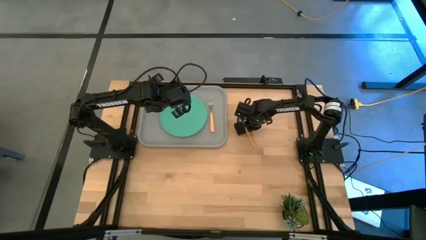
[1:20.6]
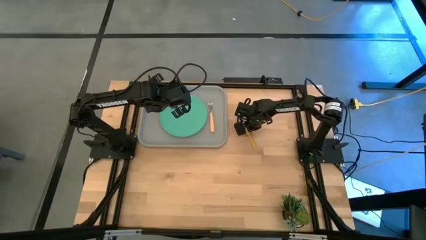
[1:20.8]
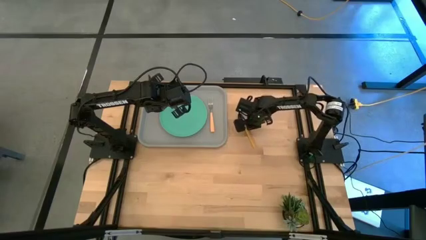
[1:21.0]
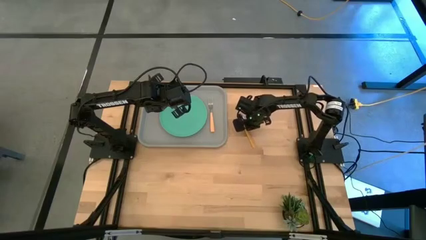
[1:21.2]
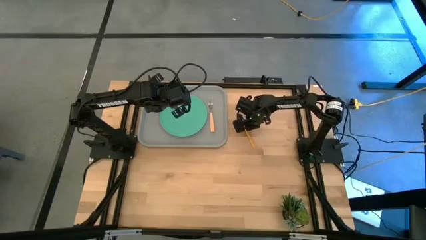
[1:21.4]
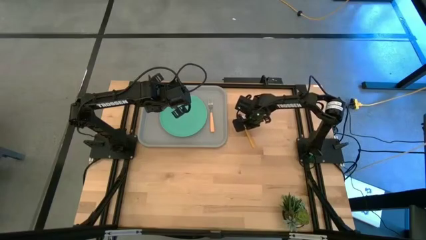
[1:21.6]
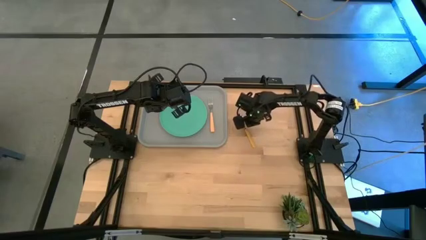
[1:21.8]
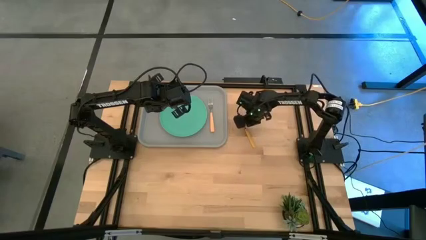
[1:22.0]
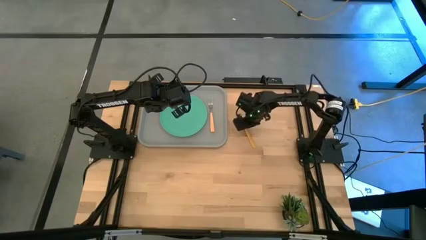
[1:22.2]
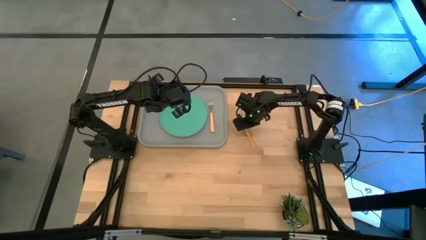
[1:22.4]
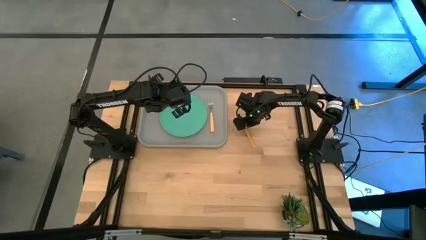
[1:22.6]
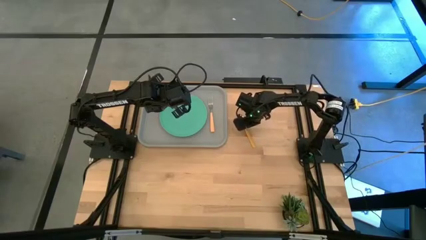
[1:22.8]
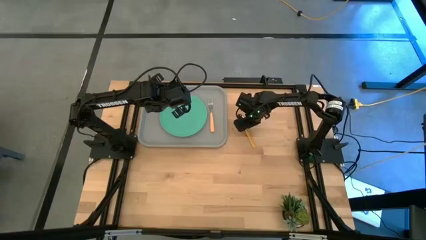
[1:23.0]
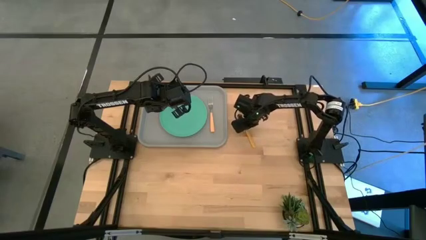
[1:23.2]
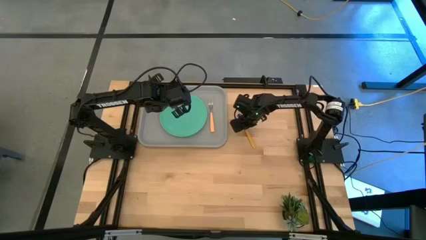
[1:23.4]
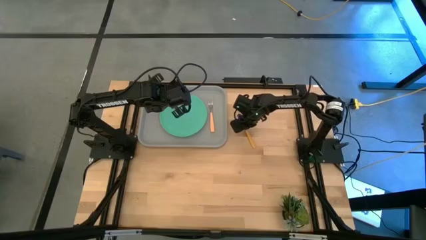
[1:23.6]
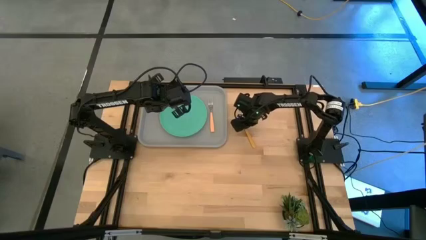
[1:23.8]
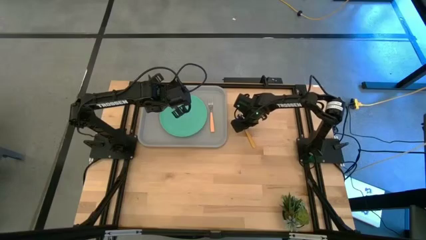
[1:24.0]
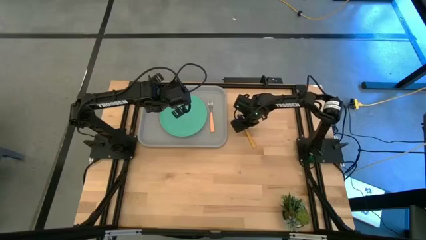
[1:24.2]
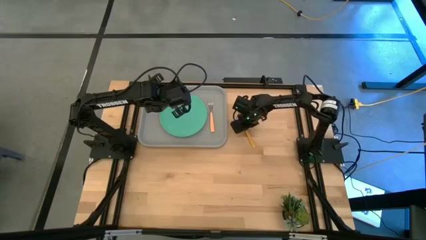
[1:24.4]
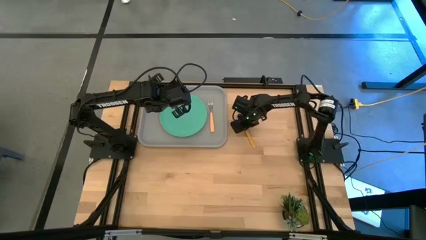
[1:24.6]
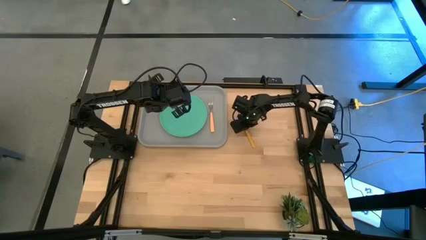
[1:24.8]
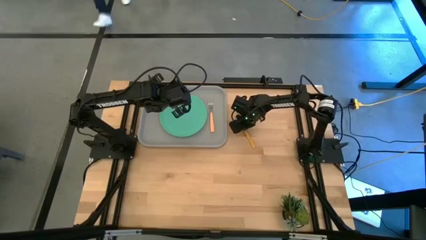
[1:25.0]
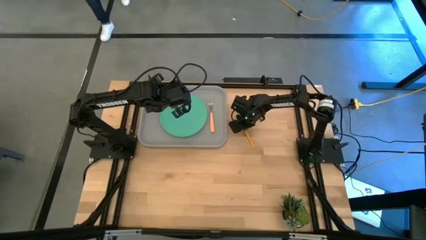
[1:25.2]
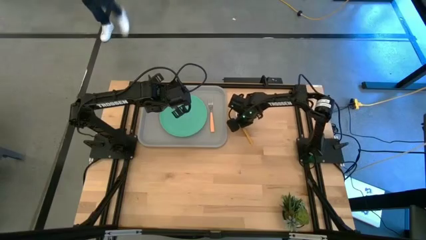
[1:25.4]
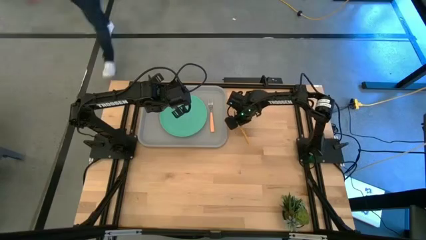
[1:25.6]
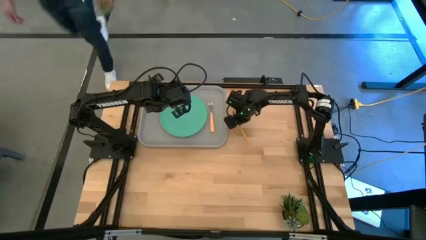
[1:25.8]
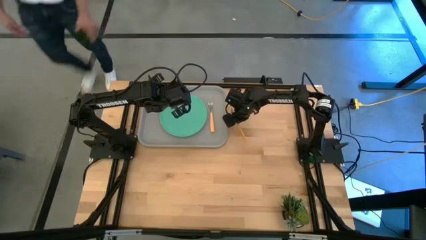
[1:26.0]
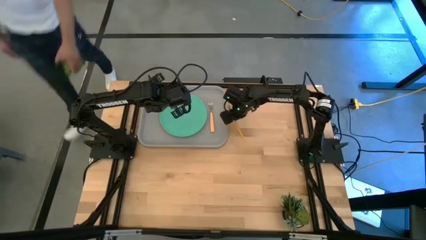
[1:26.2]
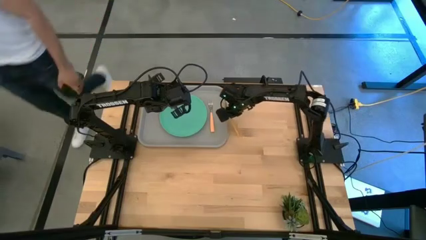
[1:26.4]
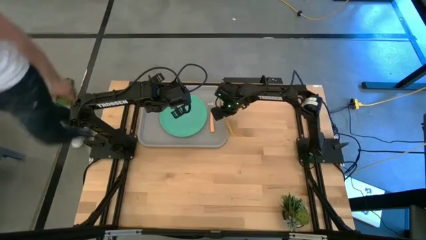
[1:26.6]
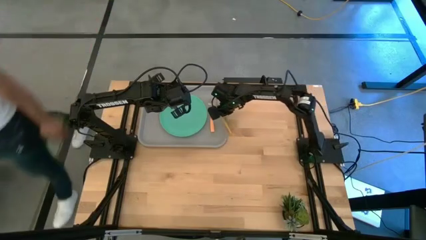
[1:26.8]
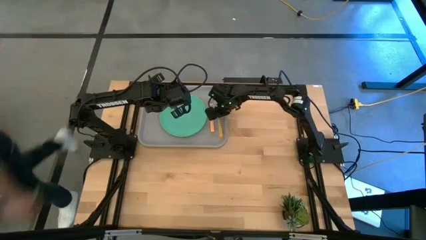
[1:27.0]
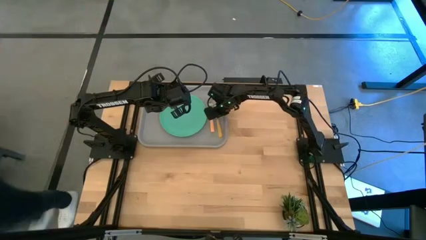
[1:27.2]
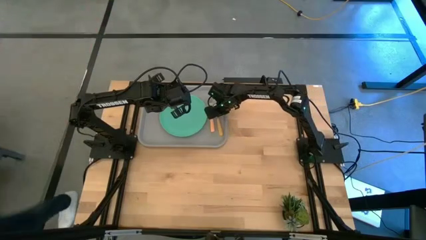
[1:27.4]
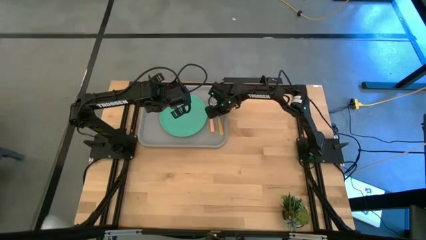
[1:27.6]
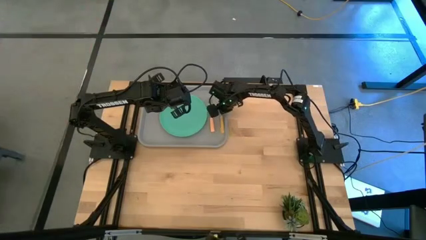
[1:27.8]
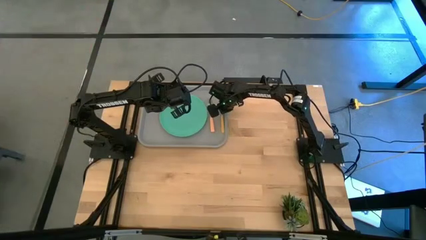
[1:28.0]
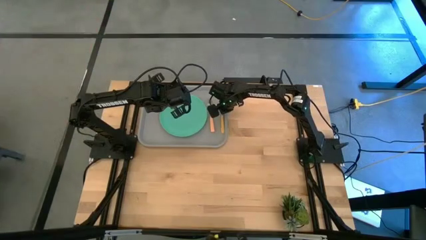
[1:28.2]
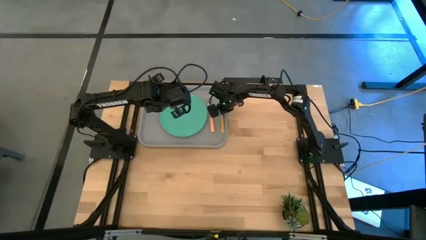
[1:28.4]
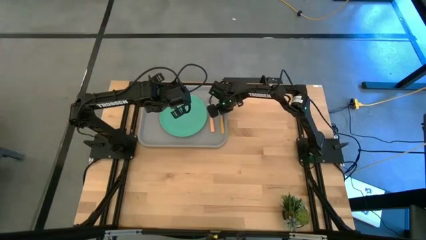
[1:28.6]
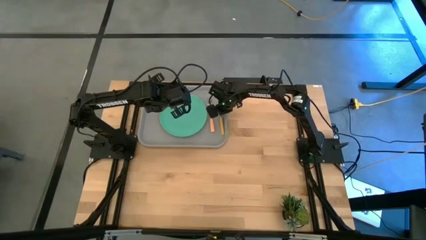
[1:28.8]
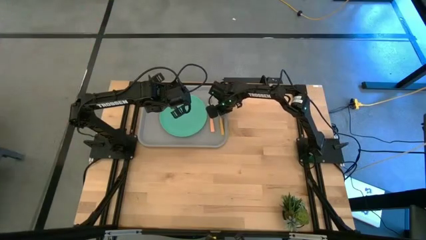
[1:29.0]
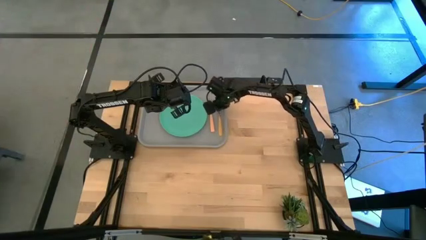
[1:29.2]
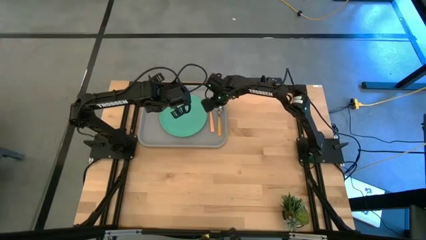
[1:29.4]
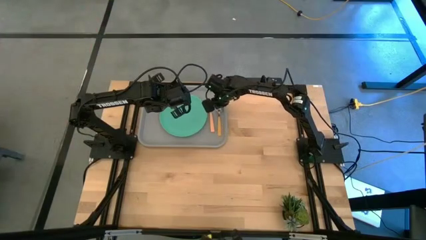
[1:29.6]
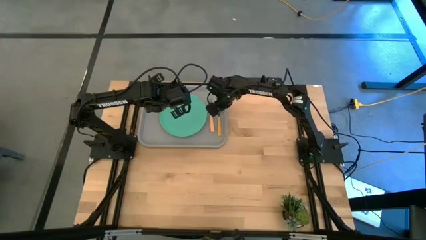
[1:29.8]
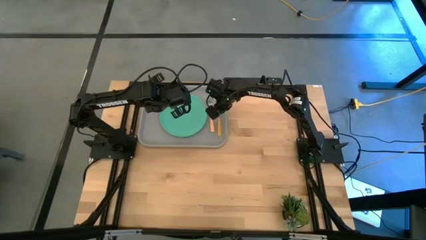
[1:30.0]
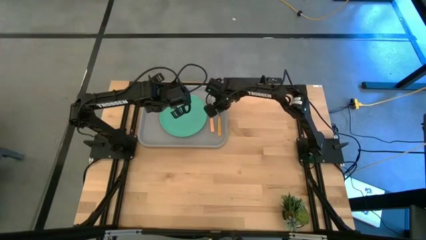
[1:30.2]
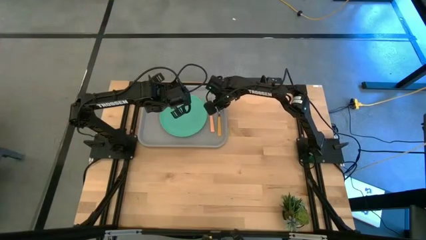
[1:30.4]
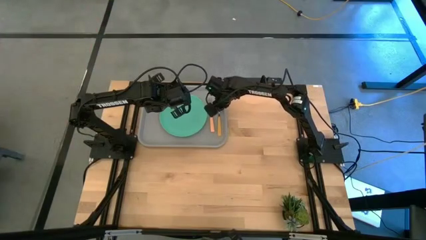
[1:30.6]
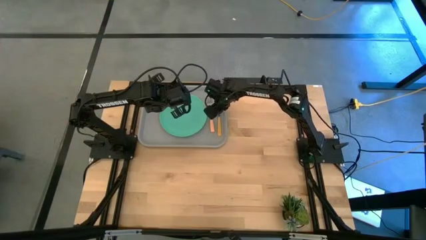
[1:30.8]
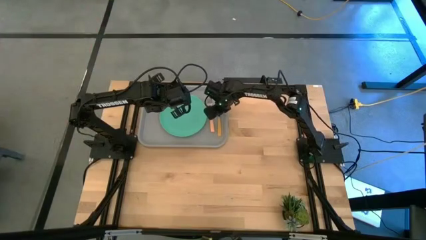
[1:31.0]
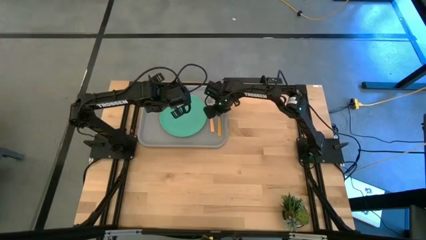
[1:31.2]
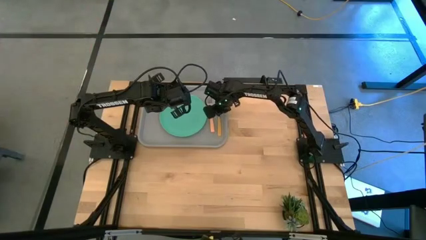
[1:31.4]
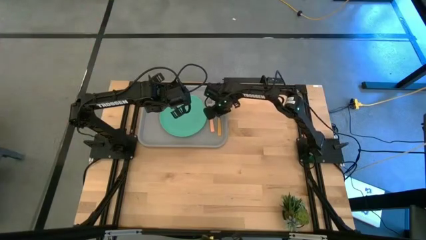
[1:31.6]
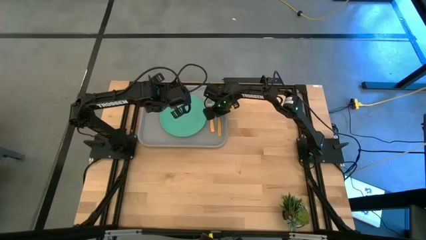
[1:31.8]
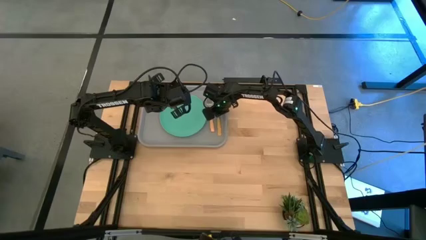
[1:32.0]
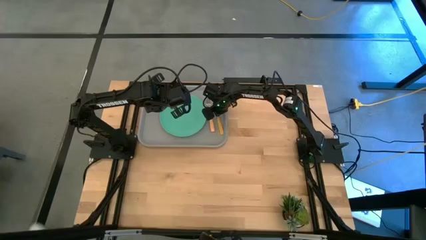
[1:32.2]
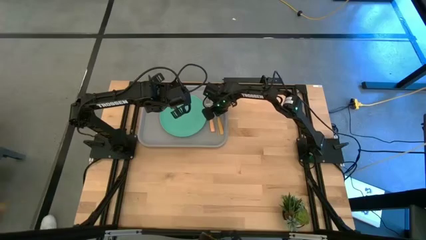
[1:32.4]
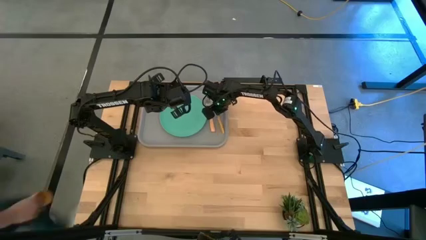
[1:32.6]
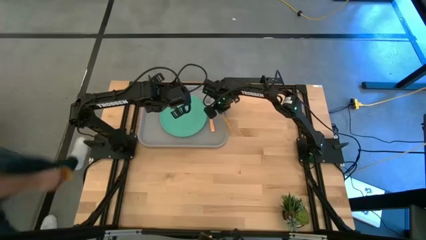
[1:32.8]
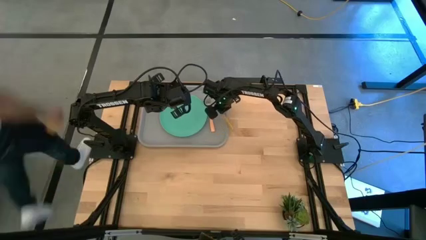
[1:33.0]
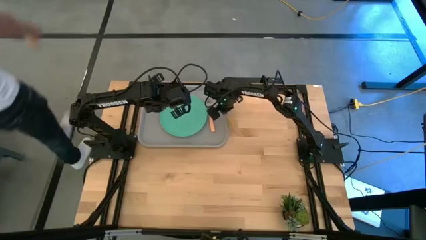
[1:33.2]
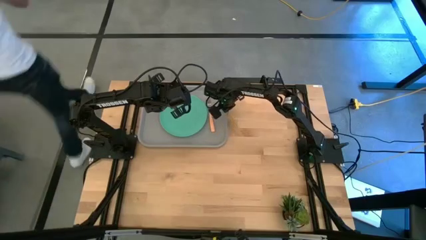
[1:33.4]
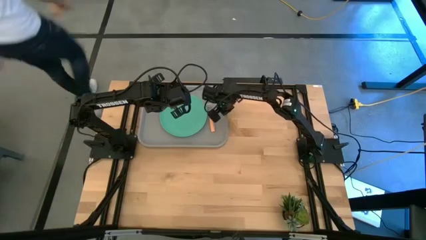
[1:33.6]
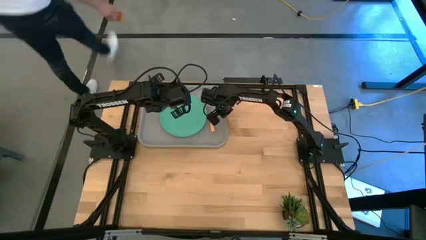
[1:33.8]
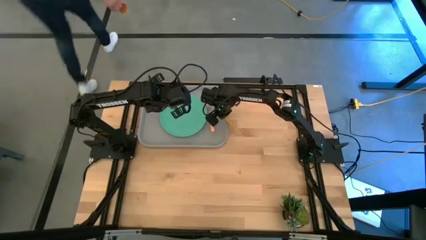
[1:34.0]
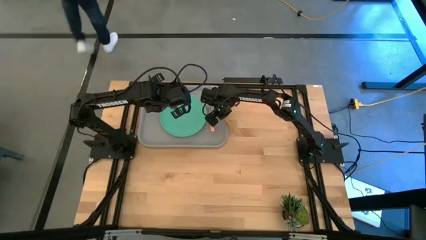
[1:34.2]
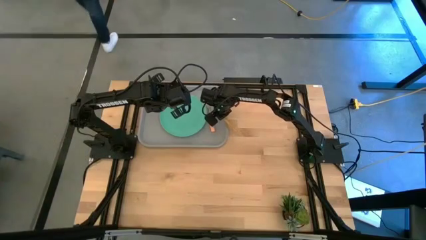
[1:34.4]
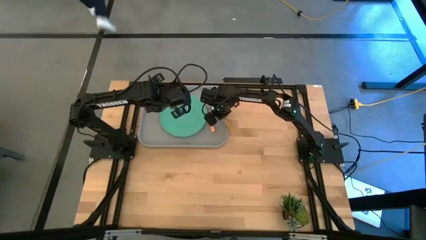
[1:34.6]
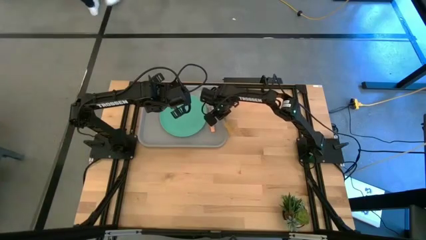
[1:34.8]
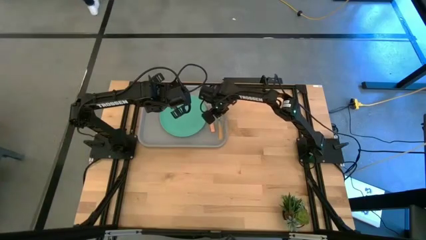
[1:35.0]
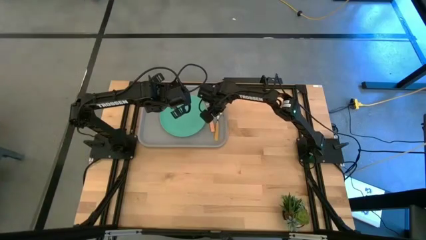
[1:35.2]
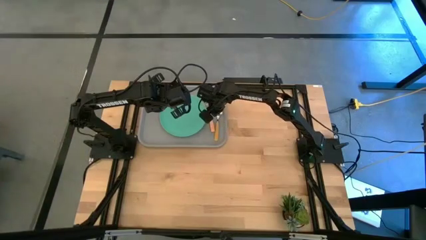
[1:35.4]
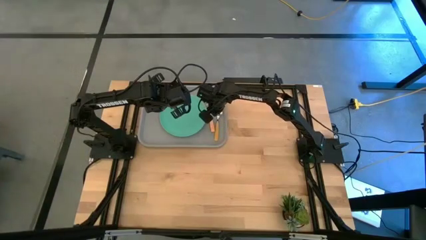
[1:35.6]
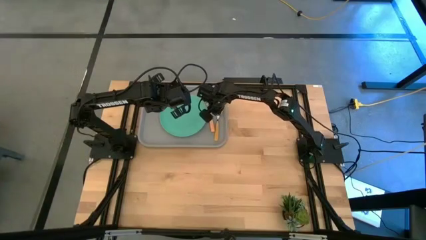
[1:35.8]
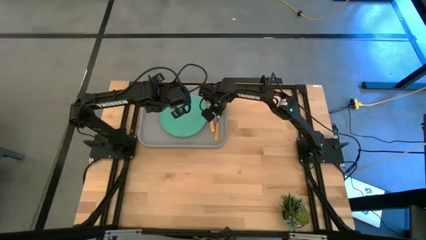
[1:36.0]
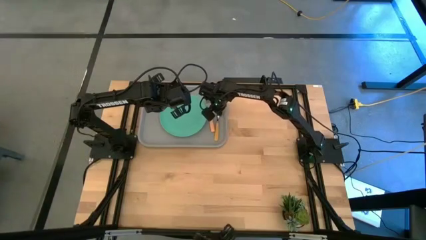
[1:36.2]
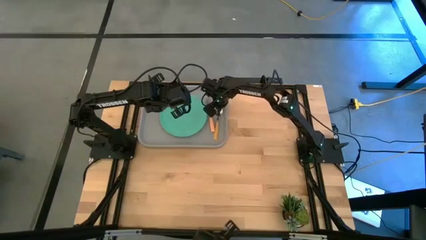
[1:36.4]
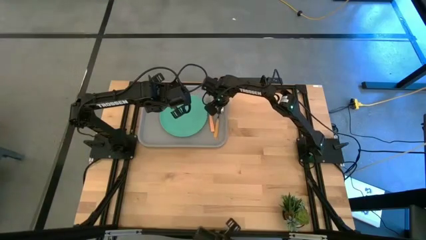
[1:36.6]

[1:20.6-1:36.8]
Task: Pick and place plate/cup/fork/spoon on tray
Put the orange spoon on the right side of the light orange fork

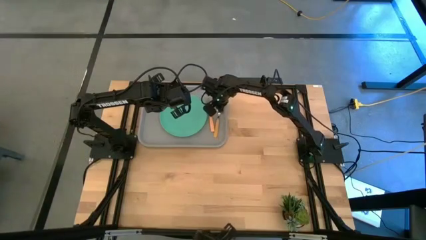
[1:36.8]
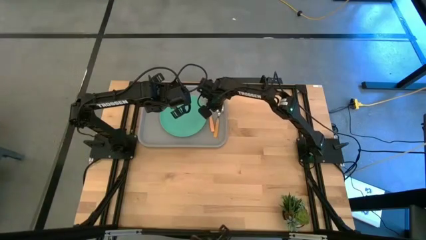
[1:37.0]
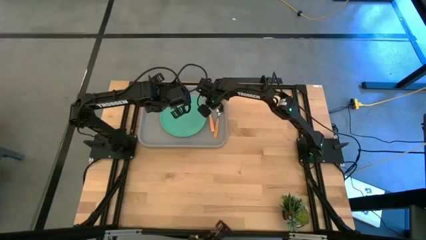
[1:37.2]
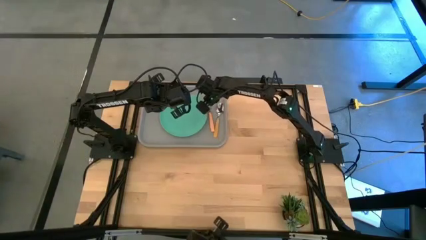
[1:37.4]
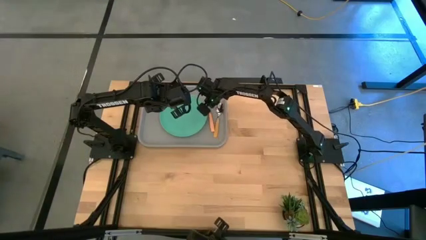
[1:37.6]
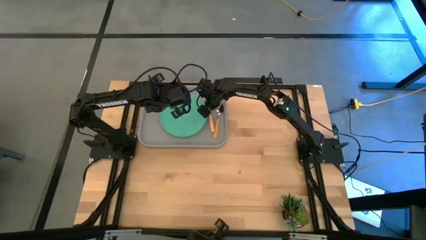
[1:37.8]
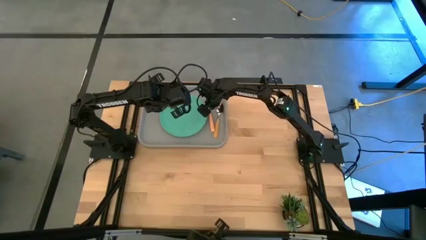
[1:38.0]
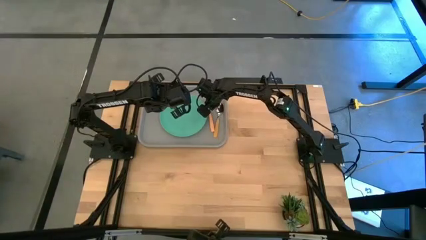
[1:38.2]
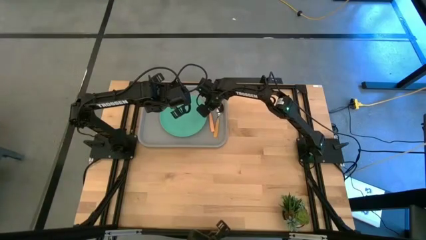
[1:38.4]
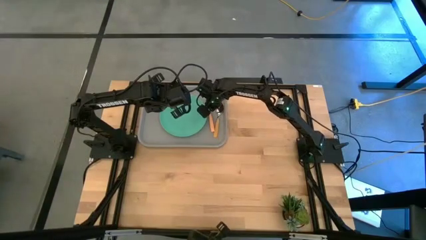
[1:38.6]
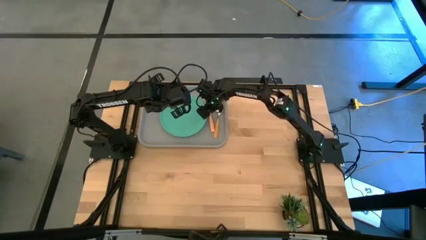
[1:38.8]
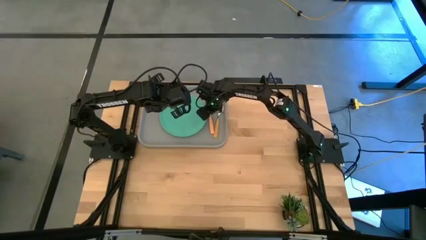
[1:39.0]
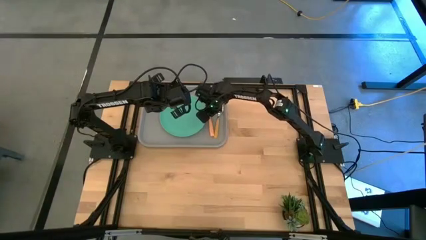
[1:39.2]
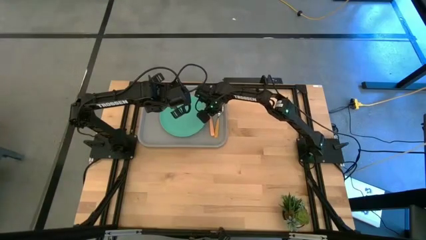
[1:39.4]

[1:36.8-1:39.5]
Adjust the light orange fork
